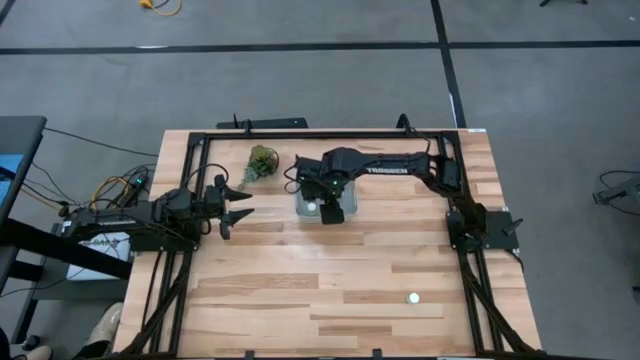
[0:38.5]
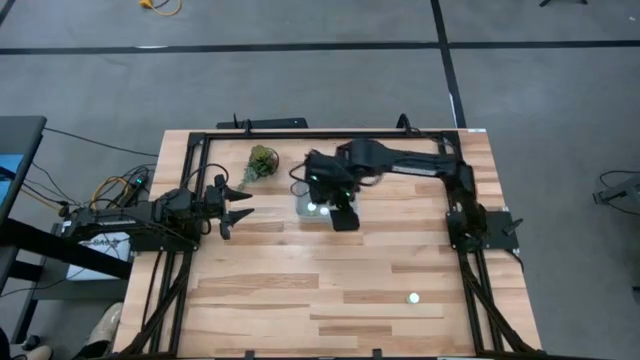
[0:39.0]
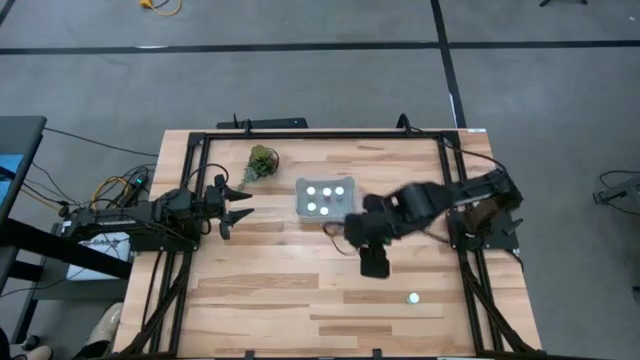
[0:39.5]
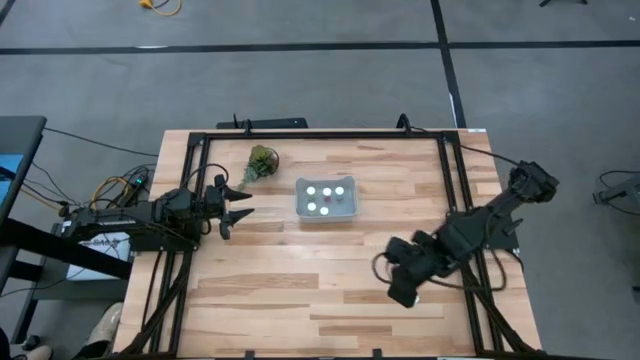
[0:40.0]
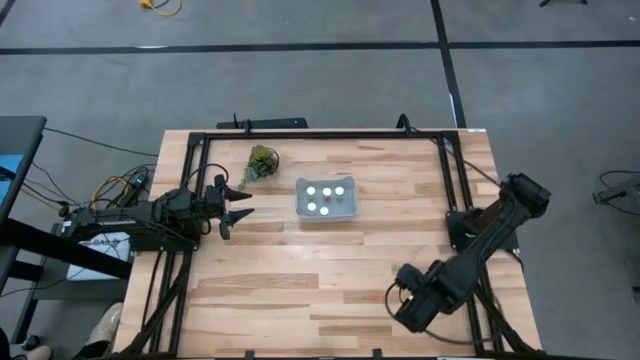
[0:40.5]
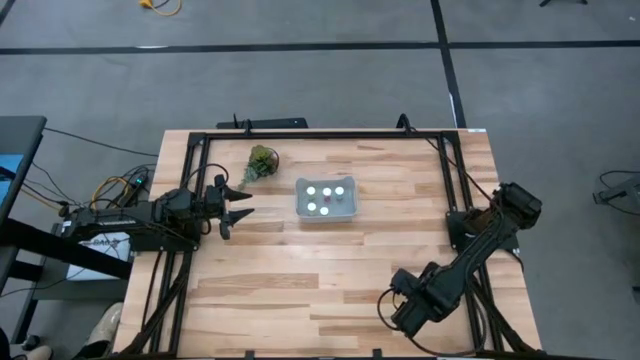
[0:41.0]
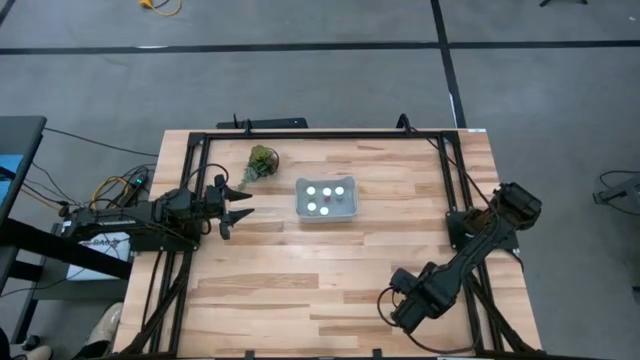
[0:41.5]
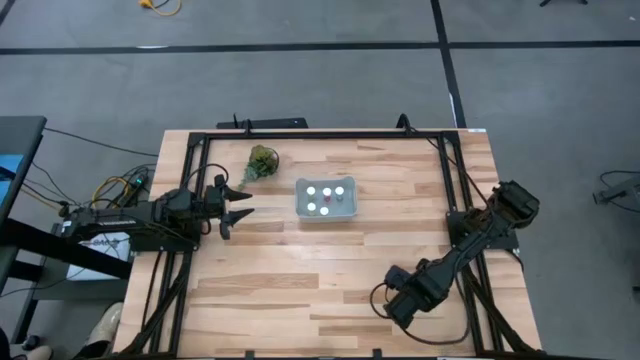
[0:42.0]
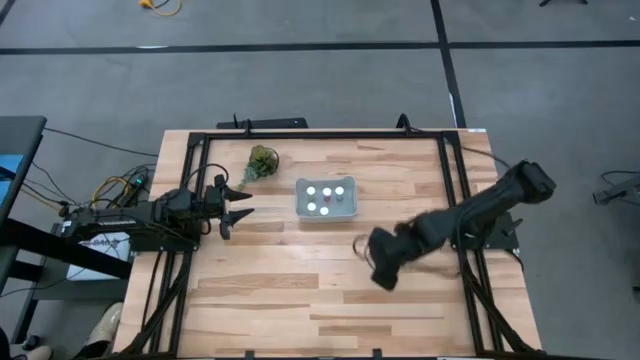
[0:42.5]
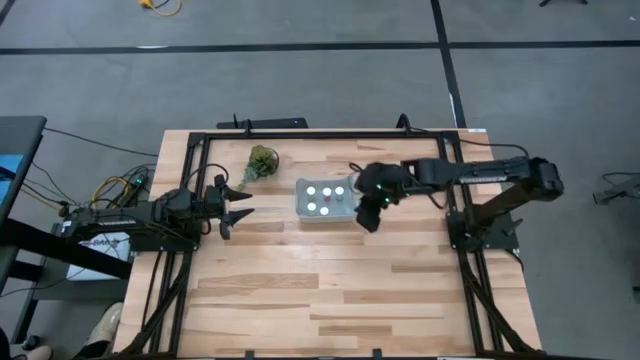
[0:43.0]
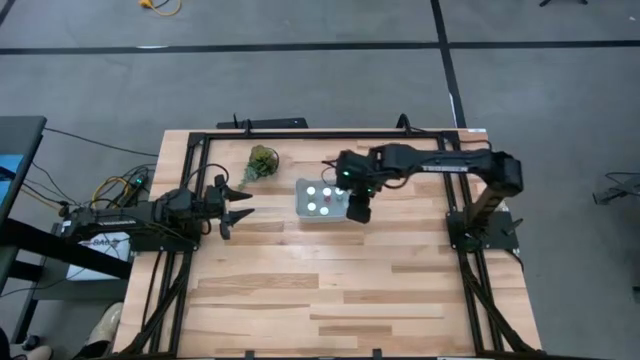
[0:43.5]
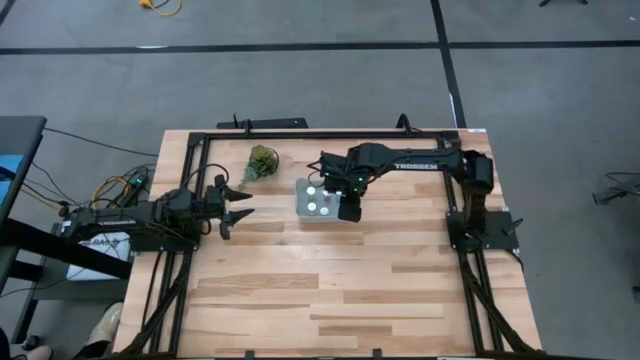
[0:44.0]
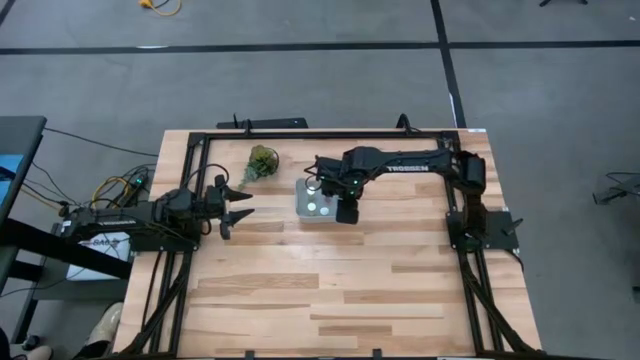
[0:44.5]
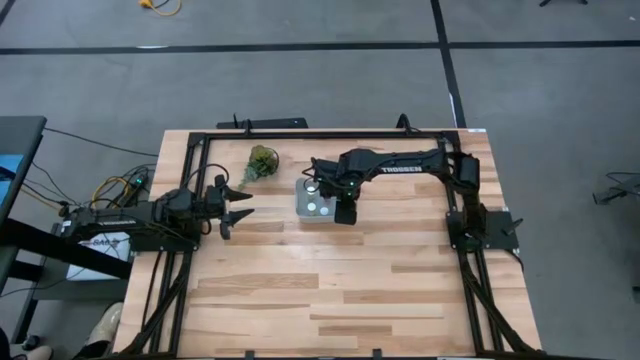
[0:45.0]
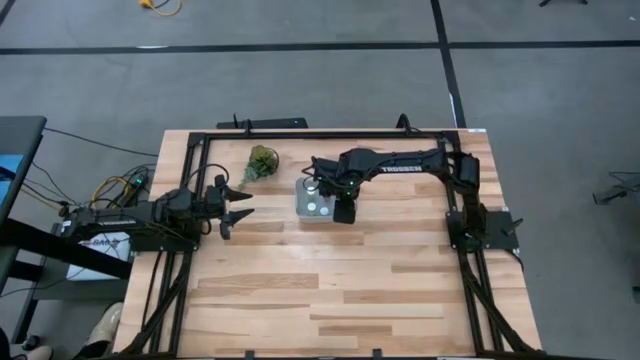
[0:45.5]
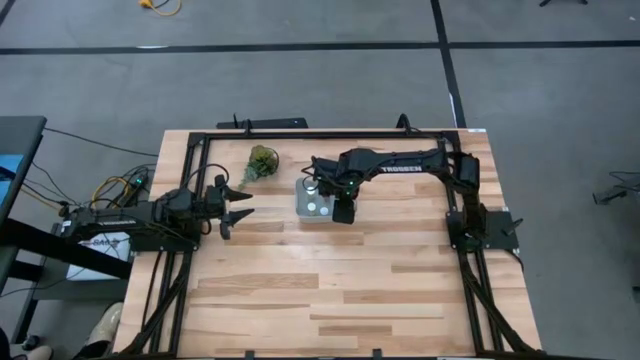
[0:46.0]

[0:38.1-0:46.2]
Task: Pick and place pill bottles into a basket
Put the blue pill bottle into the gray bin

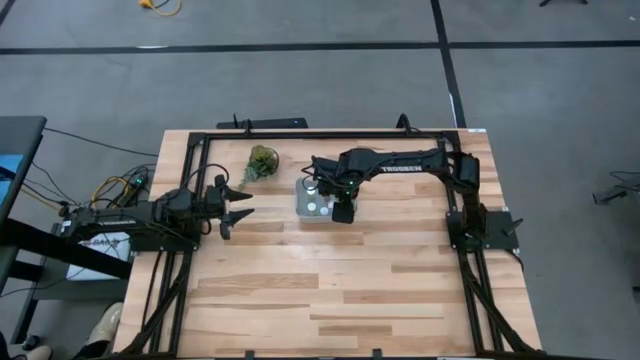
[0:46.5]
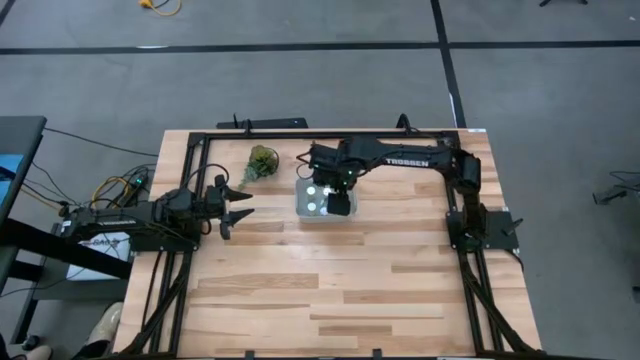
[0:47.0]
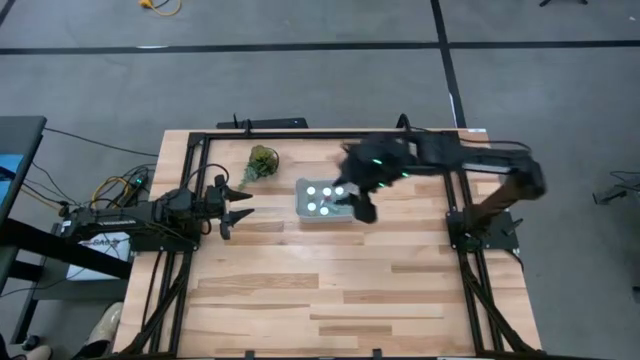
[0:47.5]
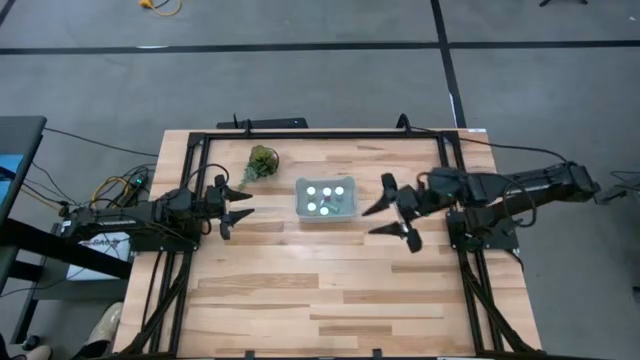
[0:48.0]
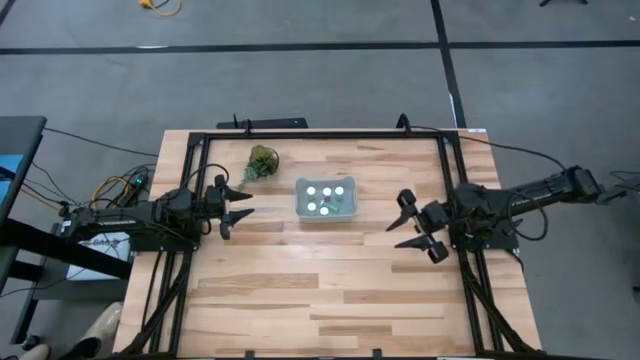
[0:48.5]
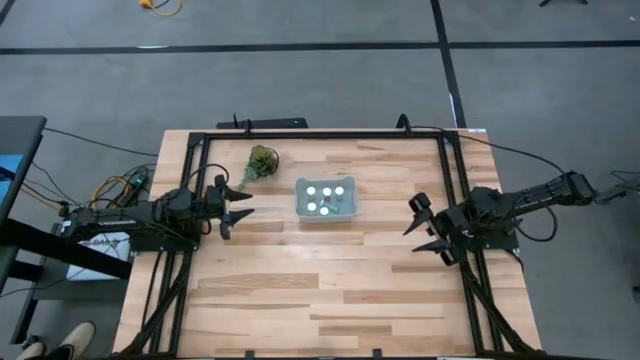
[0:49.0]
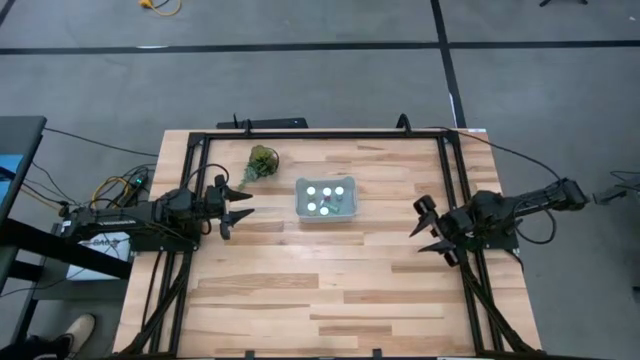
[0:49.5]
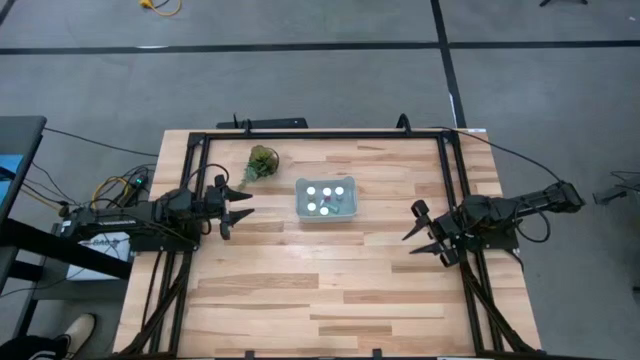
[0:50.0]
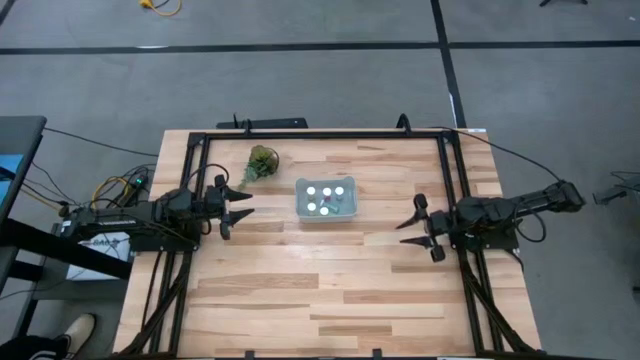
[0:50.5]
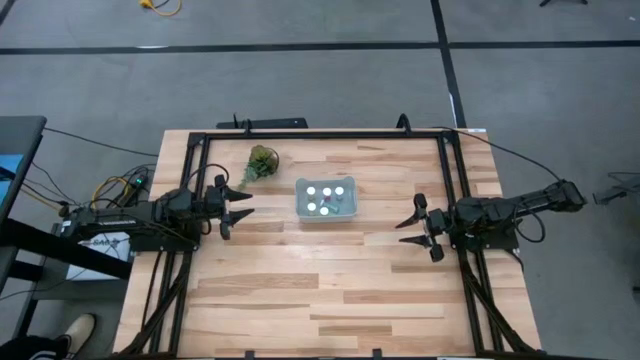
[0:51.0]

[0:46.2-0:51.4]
Return to Home Position

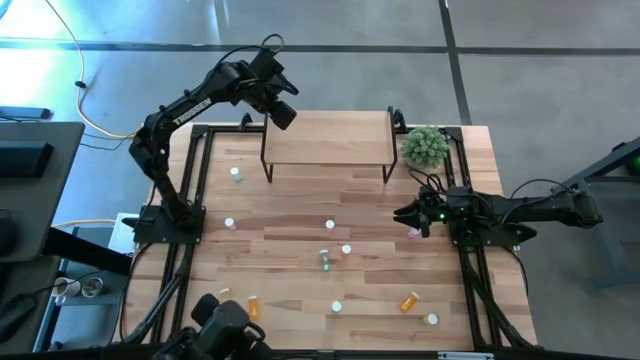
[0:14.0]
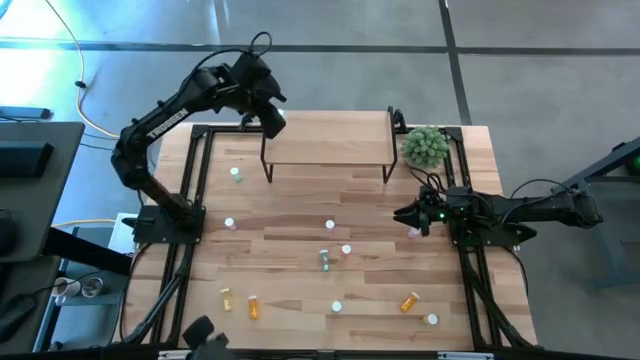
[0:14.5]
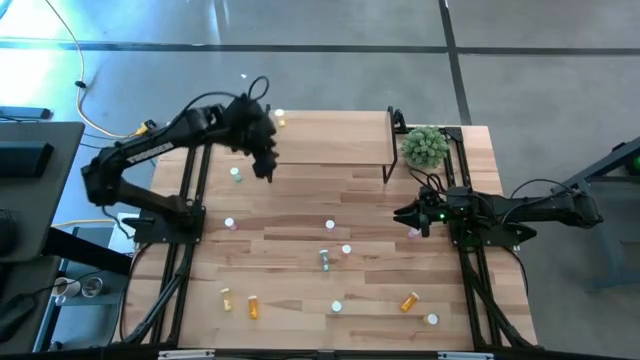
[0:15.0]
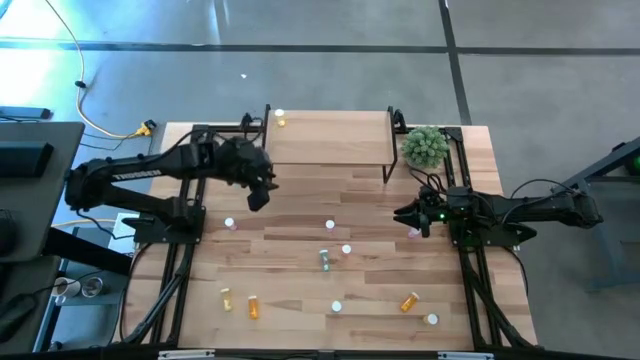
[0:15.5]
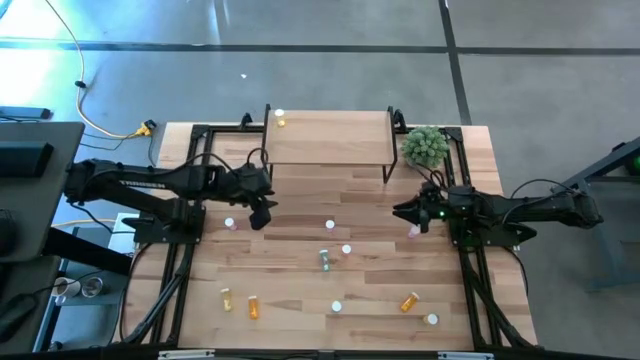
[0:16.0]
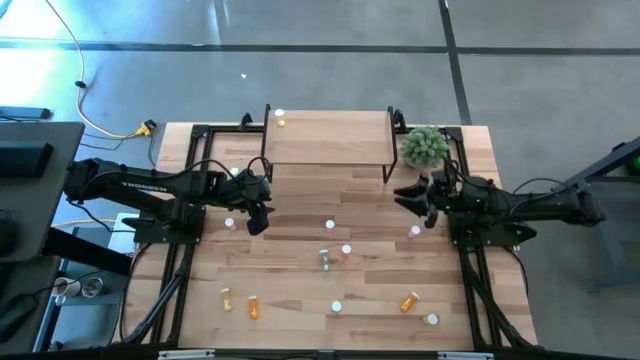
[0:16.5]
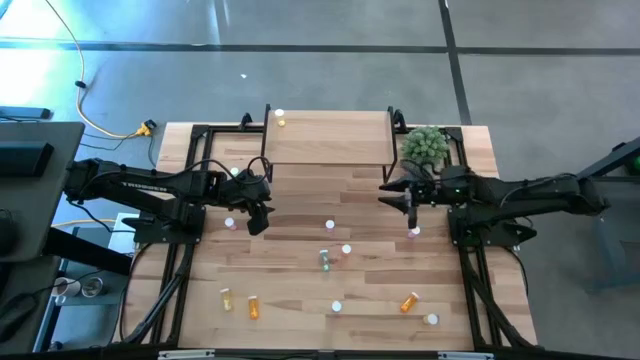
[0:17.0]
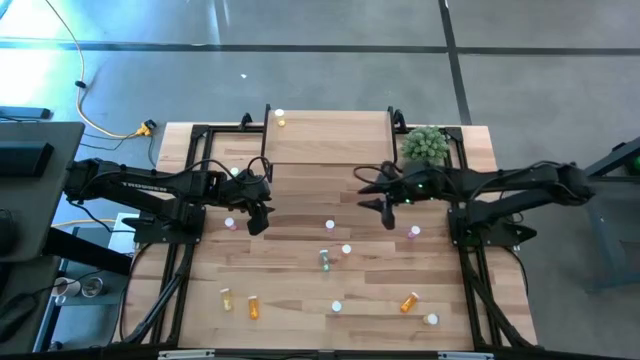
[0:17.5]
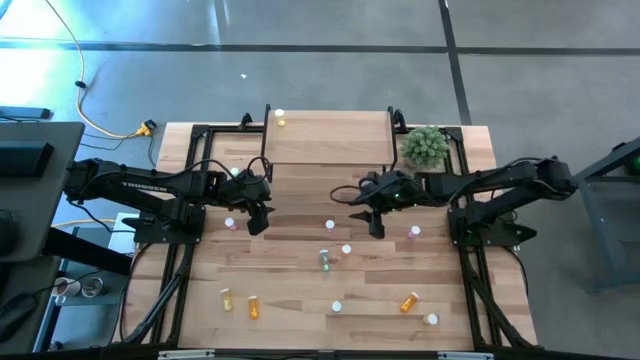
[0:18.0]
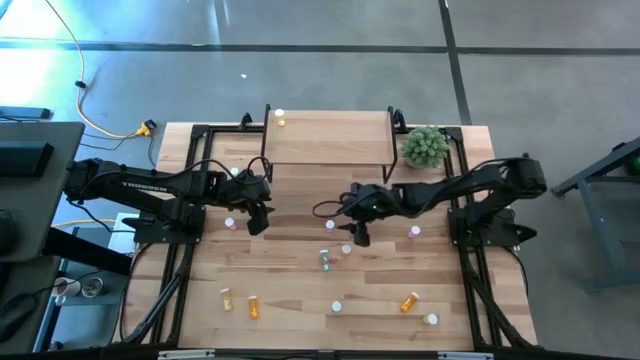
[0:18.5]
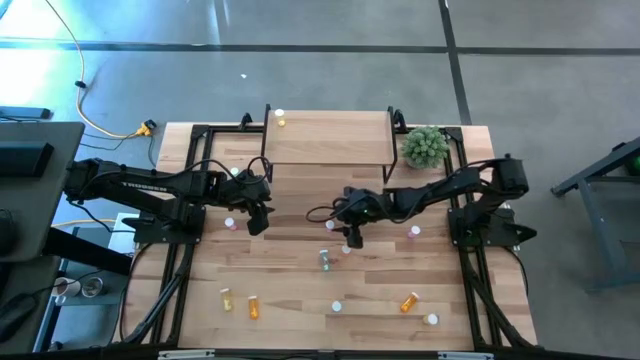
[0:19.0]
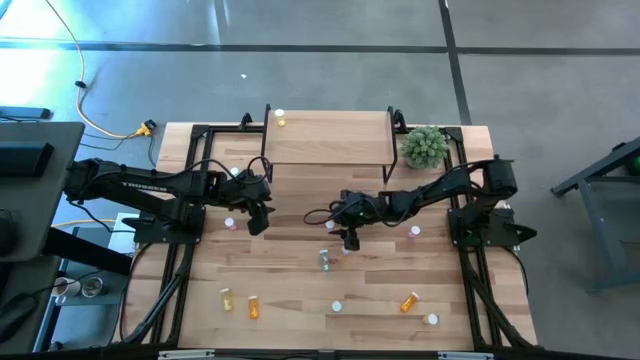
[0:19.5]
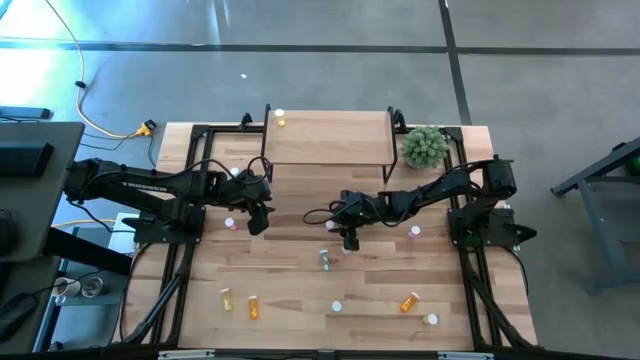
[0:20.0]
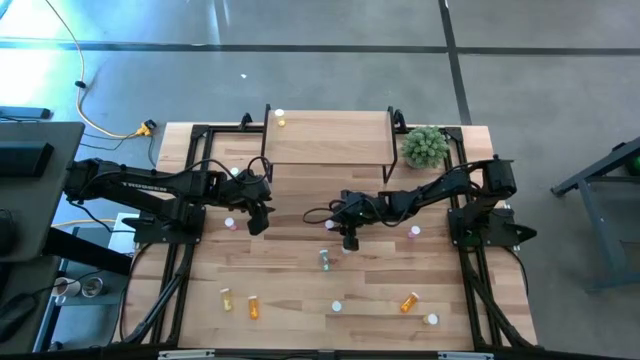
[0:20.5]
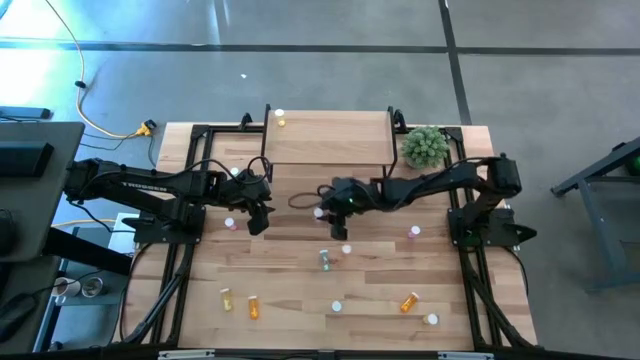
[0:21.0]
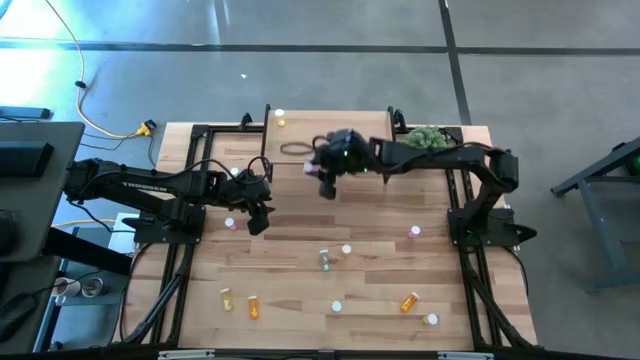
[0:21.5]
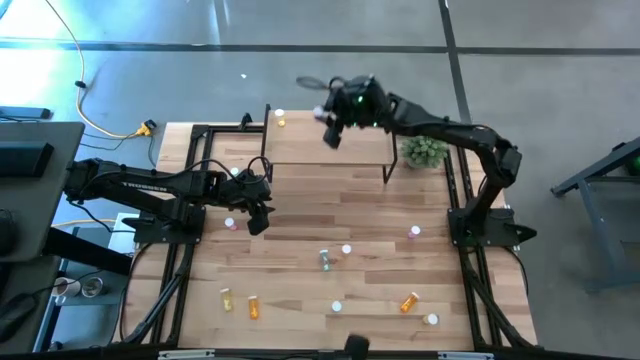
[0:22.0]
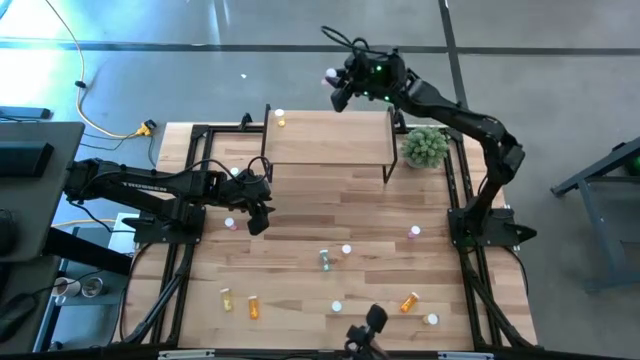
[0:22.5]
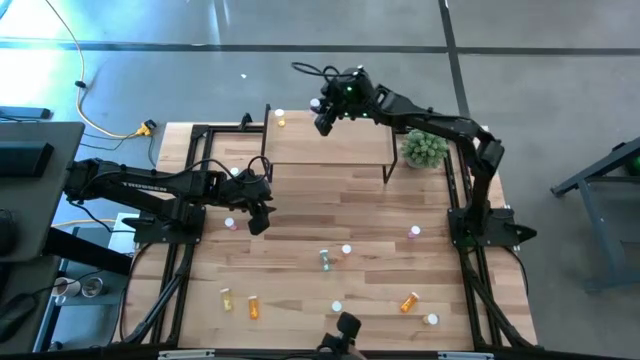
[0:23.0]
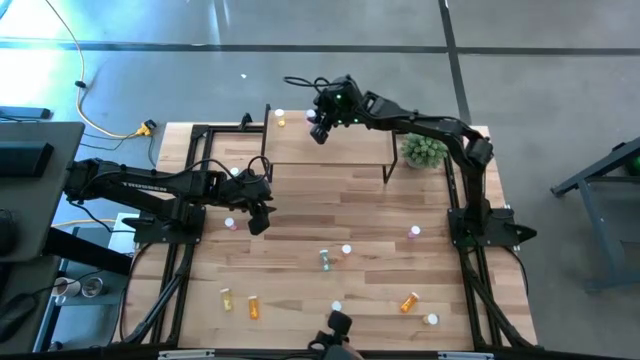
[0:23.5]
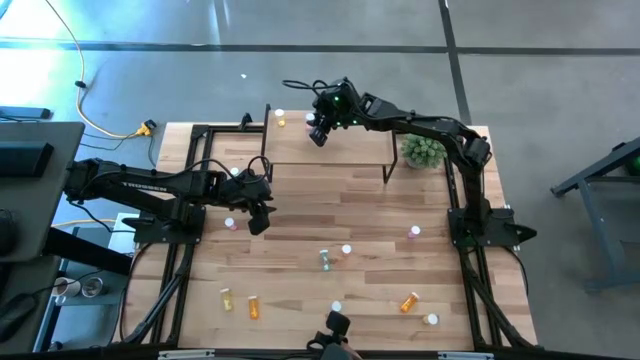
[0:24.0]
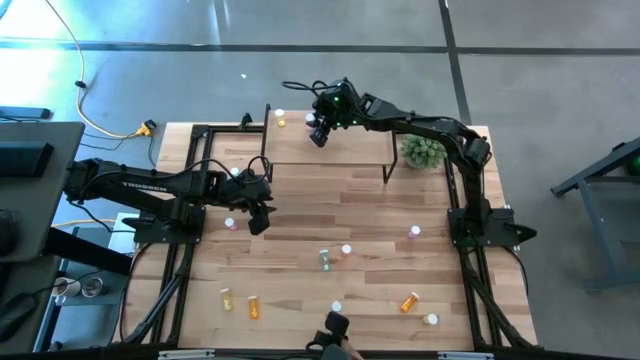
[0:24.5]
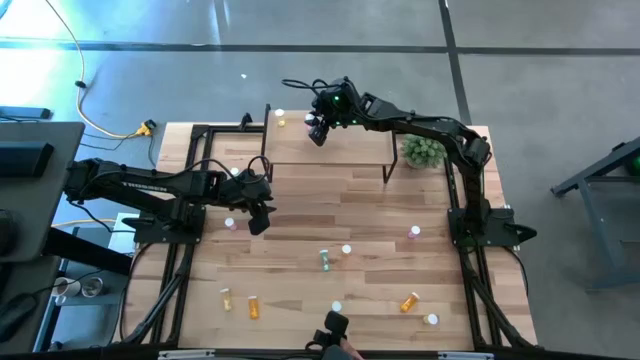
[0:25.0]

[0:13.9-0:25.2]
Task: Pick and place medicine bottles onto shelf by color
Put the middle pink pill bottle on the shelf
